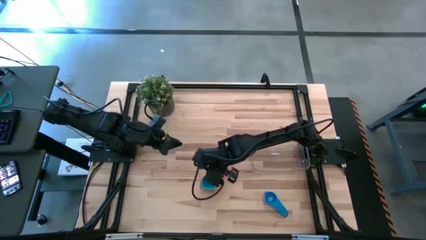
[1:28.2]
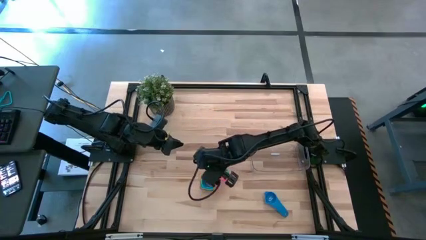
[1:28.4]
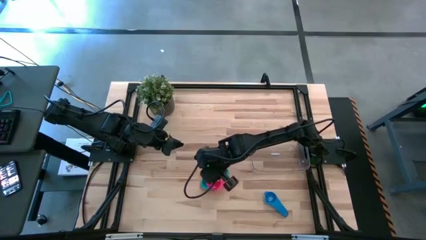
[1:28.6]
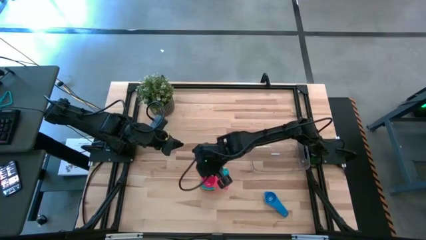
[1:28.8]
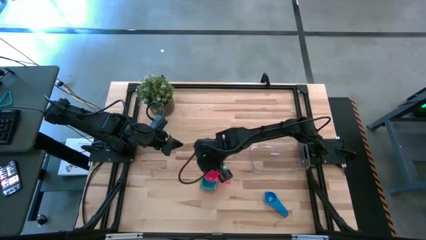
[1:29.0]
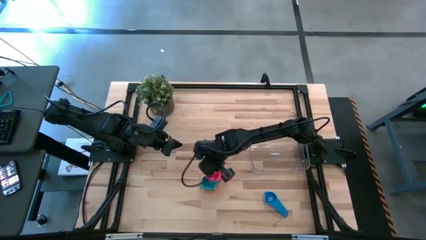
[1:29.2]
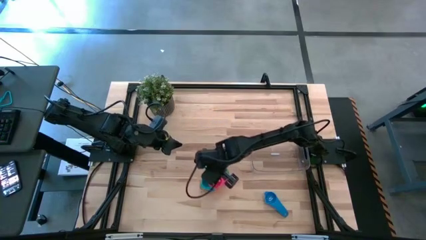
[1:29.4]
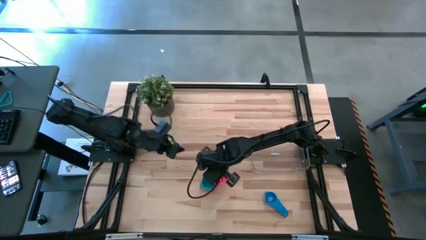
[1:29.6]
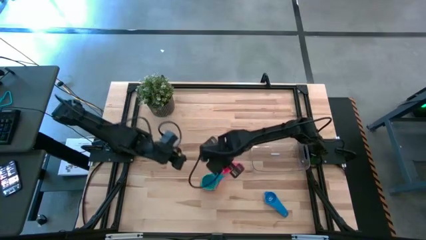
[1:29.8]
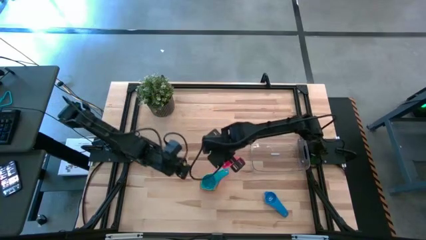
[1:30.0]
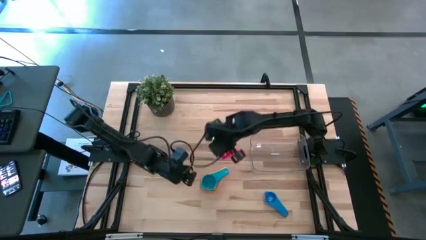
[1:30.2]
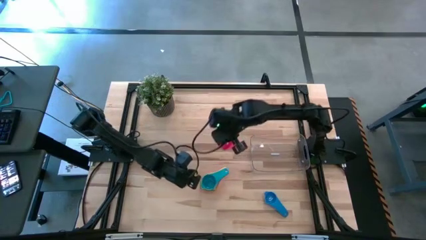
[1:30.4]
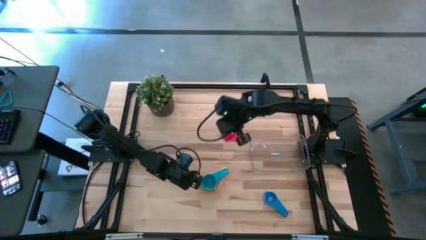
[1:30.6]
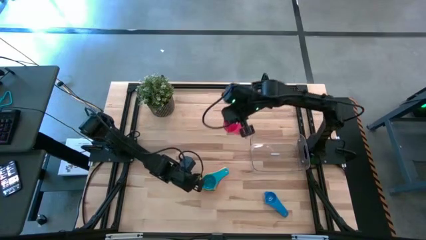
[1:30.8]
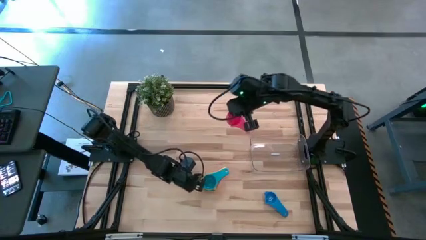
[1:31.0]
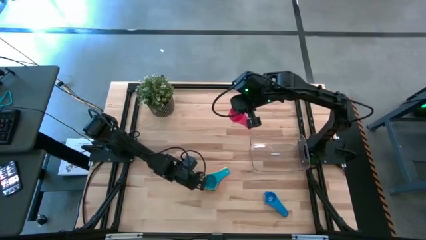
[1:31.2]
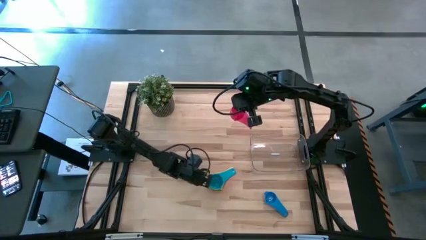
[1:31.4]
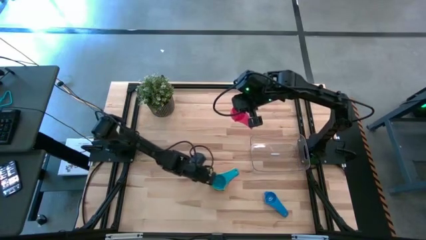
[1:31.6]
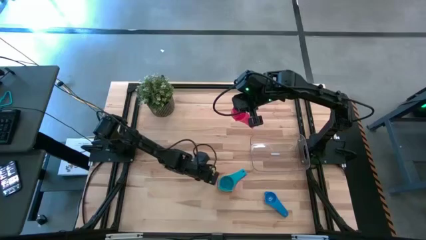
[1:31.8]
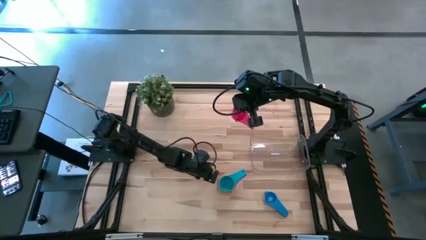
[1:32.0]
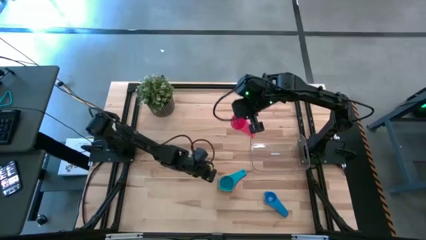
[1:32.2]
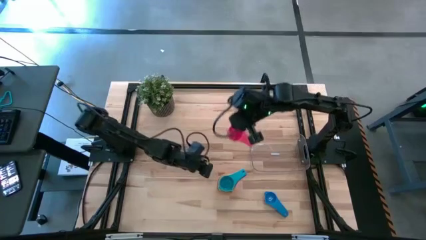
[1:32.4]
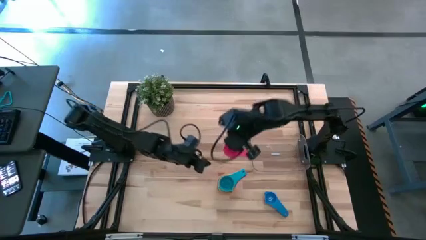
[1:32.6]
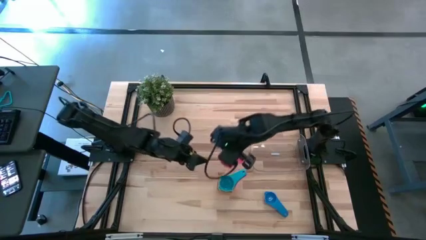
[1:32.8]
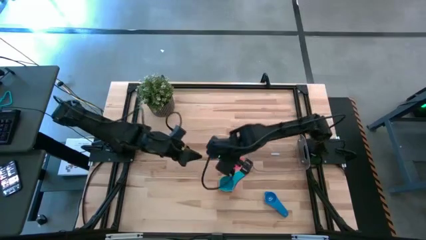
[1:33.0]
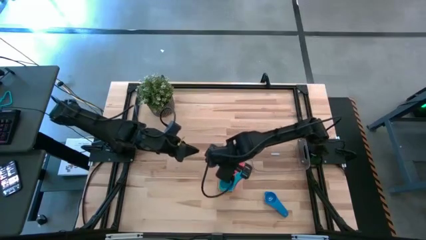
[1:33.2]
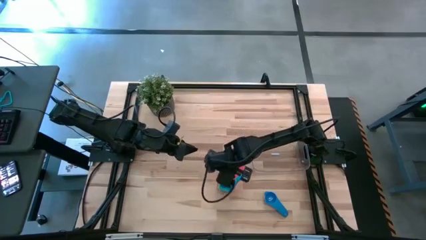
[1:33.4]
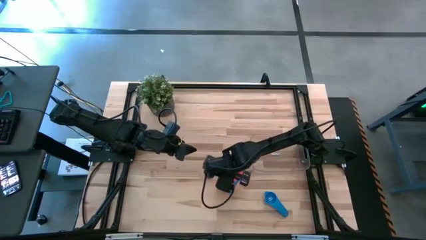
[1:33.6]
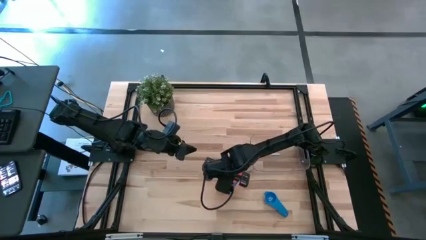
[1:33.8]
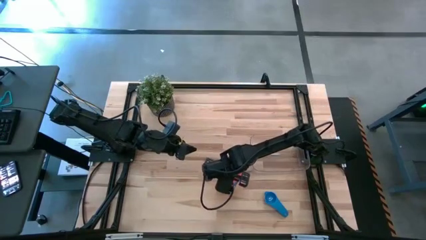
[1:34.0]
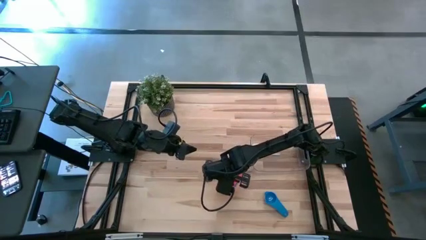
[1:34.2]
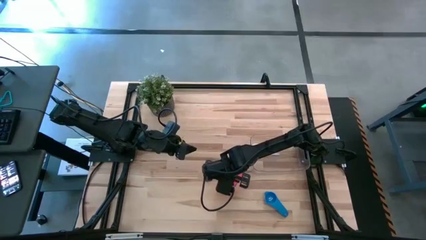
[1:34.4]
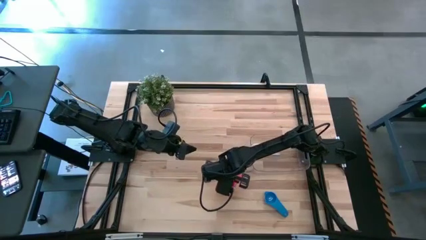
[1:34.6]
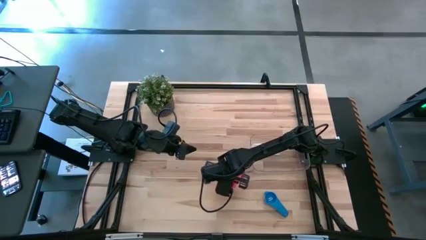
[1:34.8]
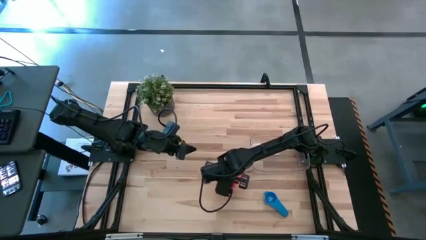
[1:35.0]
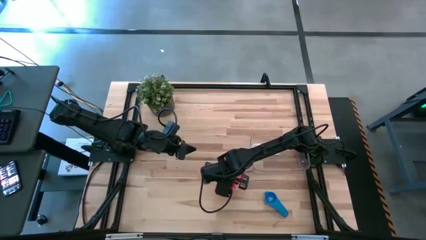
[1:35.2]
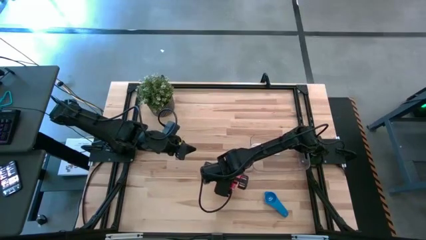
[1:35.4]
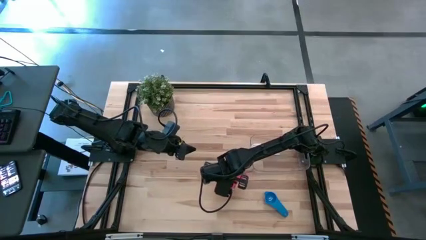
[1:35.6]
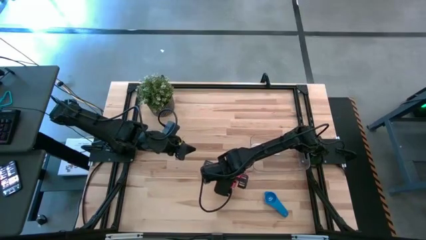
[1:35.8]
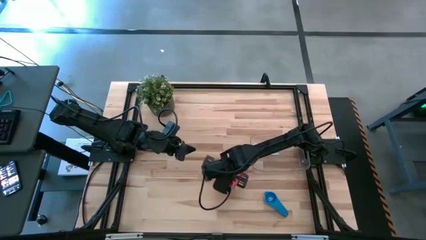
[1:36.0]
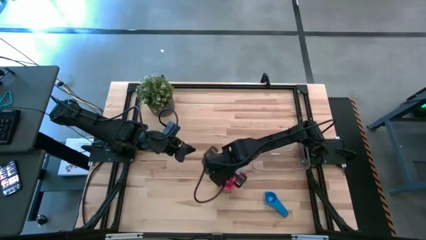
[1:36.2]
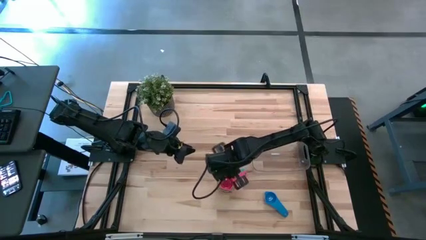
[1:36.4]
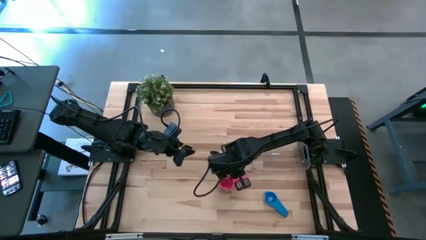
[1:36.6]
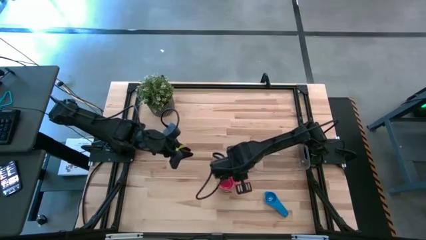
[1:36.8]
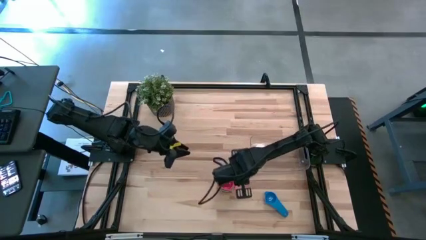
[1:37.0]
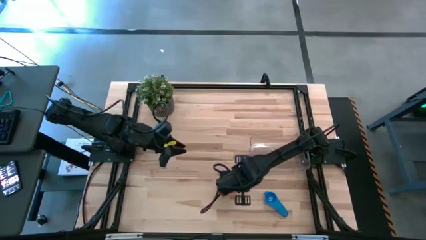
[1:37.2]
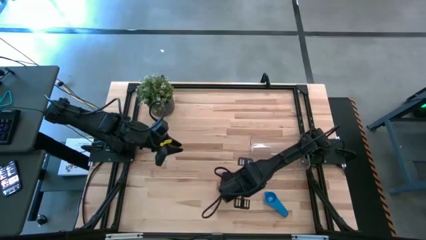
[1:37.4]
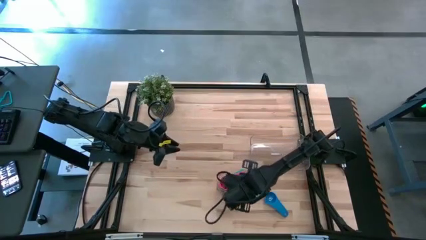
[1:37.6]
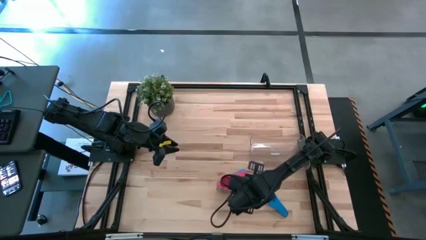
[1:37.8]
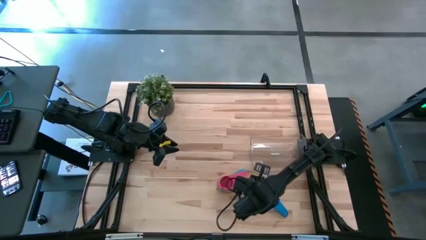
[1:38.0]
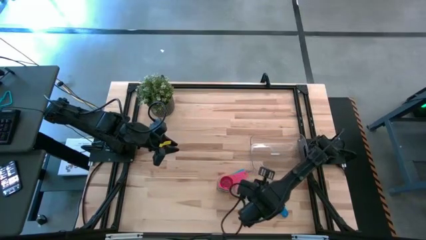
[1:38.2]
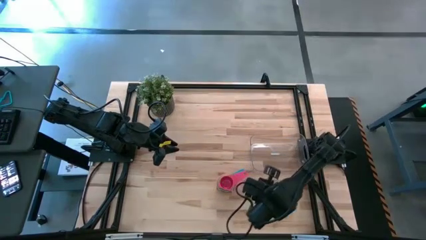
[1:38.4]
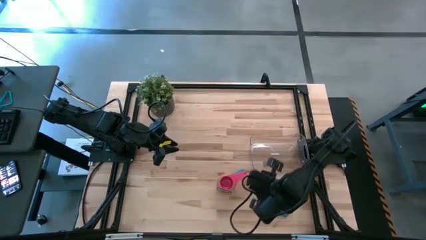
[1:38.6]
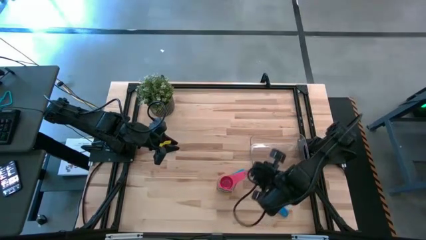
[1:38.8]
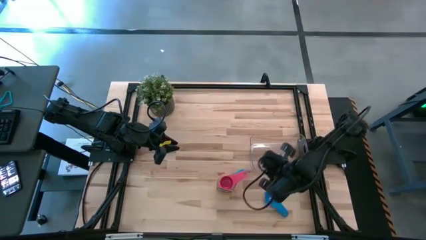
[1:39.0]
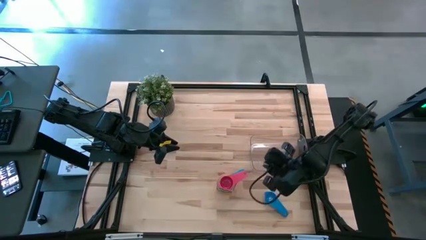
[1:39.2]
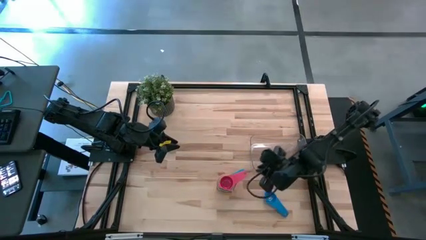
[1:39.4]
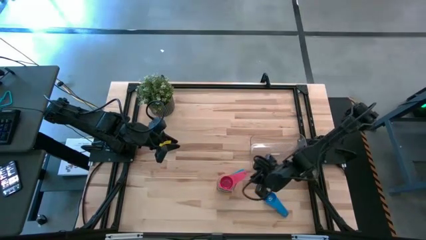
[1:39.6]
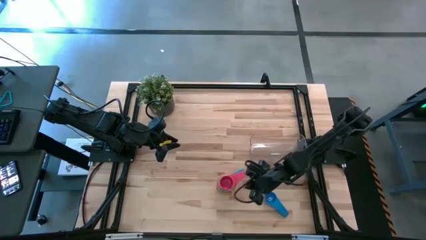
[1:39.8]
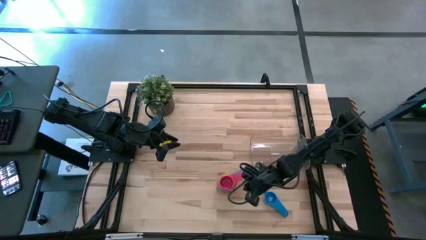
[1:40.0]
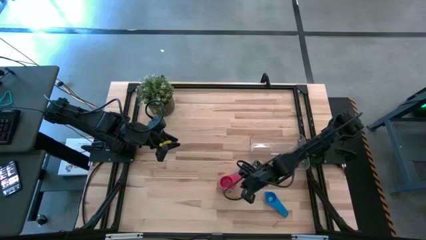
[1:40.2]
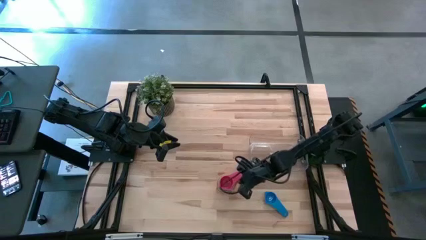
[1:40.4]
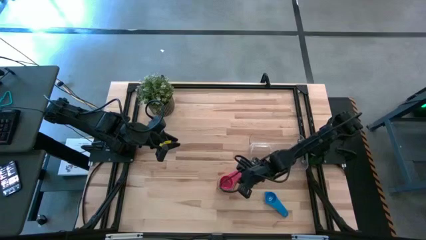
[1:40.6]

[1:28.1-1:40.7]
Task: Nest measuring cups in basket
Stack the red measuring cup on top of the light blue measuring cup

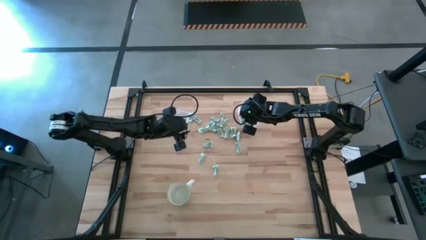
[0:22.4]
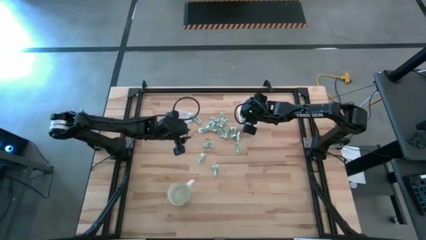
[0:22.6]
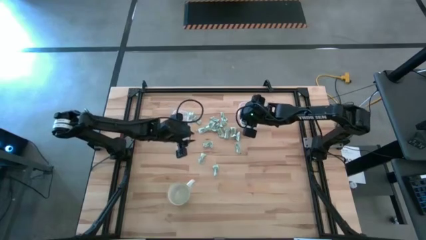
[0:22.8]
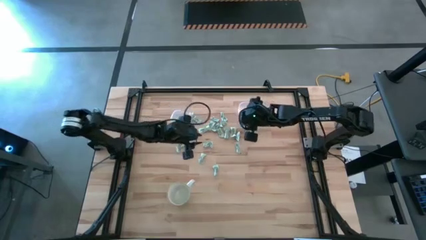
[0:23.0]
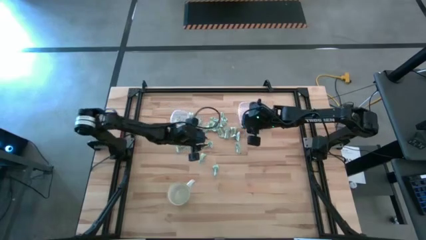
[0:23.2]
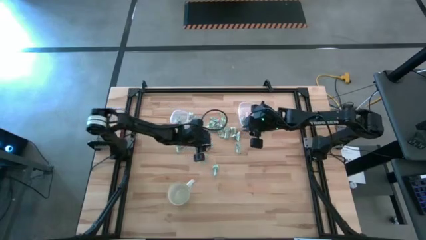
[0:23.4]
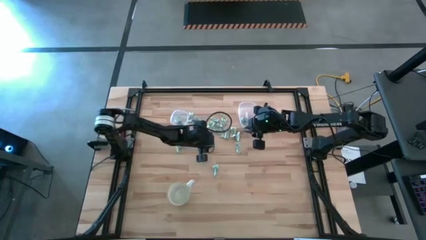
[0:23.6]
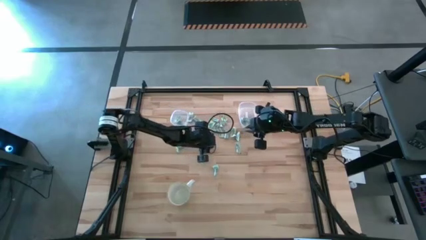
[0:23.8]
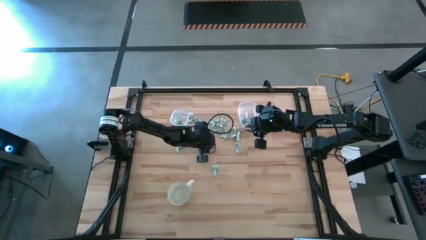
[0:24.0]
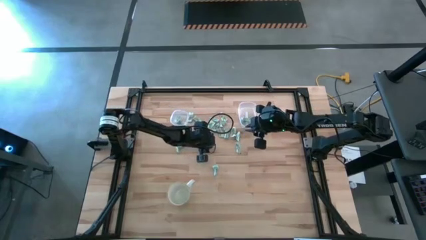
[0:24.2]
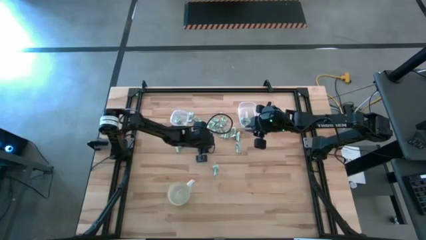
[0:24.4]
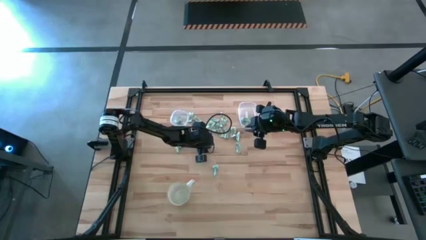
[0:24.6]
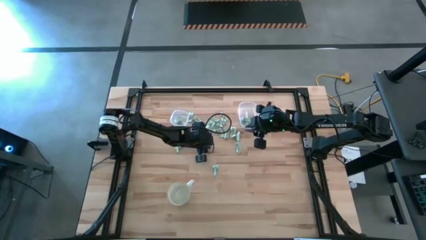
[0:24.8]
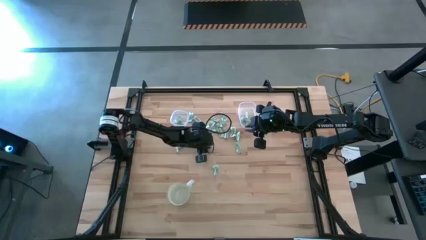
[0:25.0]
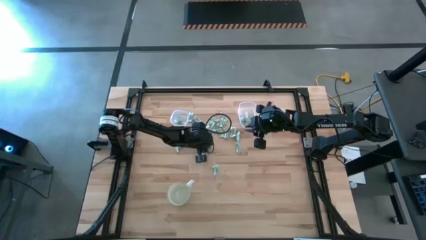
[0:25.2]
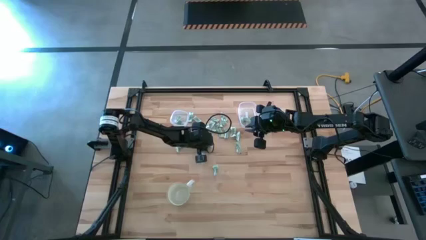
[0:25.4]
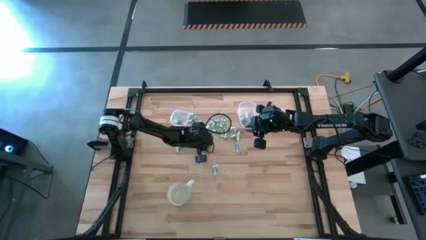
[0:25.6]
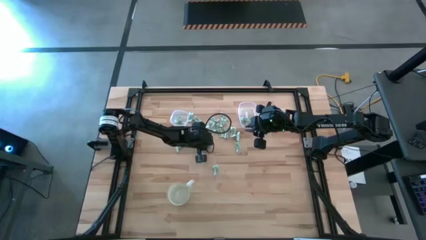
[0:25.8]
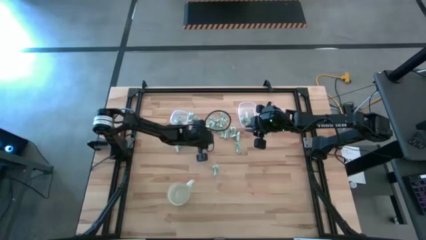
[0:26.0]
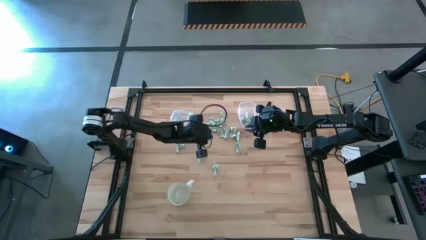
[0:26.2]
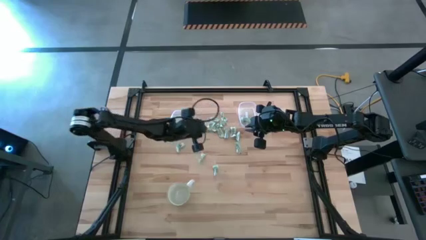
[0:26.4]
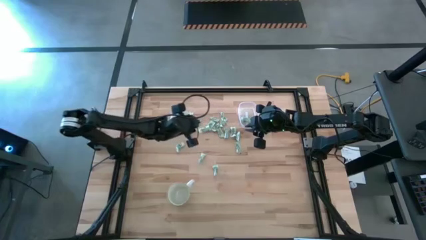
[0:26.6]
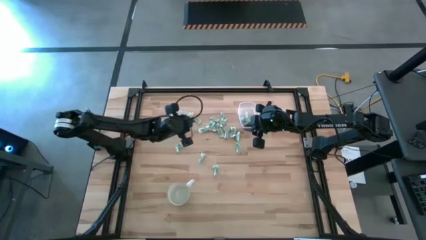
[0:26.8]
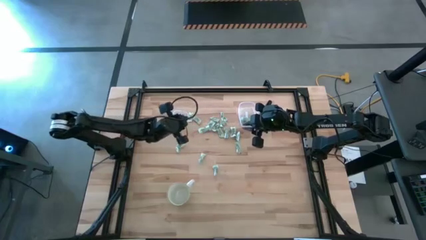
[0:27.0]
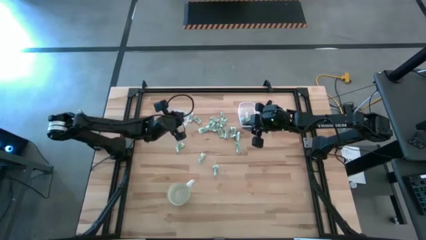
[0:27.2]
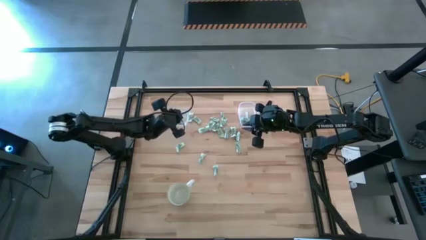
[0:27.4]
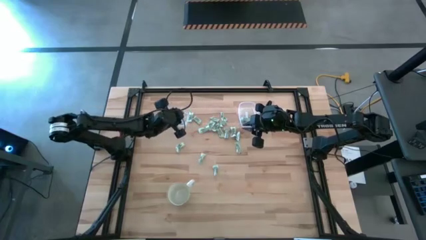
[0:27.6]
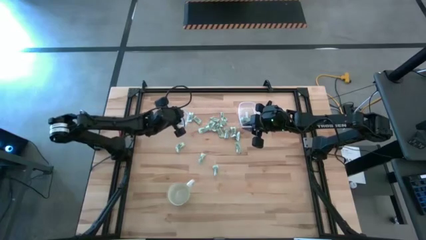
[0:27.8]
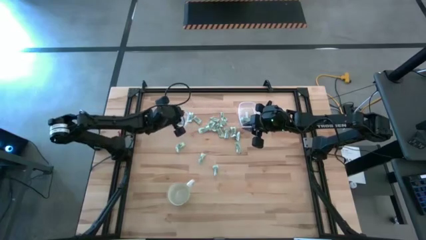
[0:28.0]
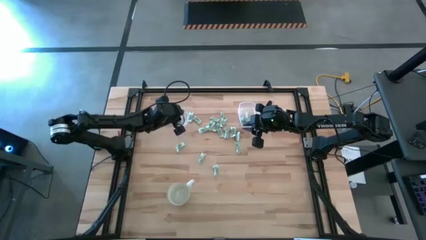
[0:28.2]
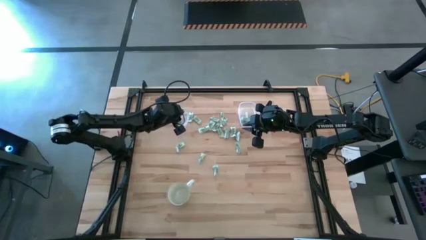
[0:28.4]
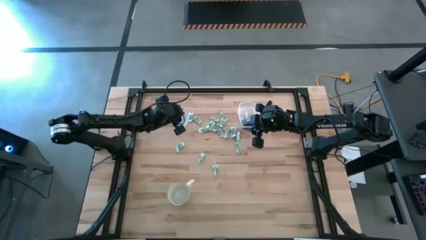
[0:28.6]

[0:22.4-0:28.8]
Task: Pick and place items into bin
Put the green stevia packet into the square transparent bin
